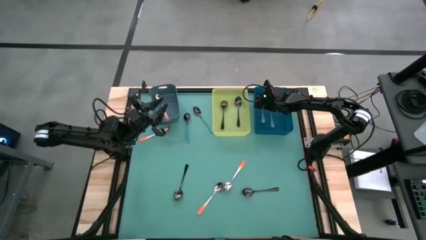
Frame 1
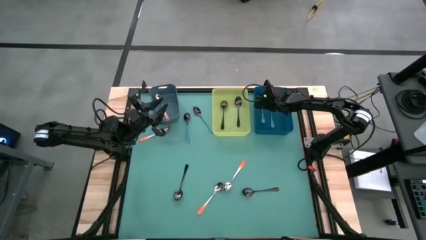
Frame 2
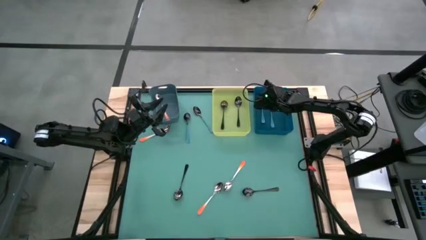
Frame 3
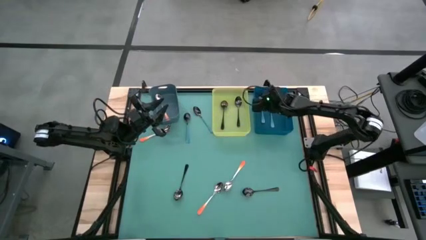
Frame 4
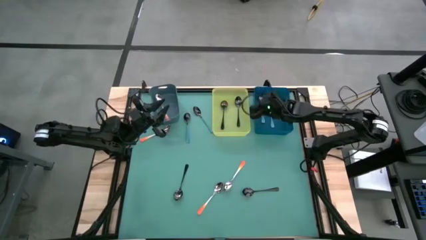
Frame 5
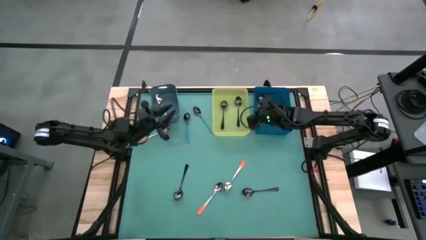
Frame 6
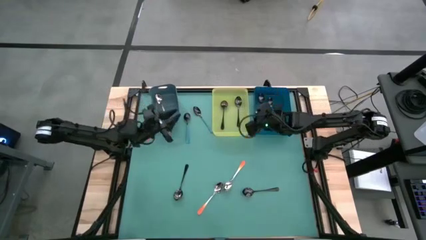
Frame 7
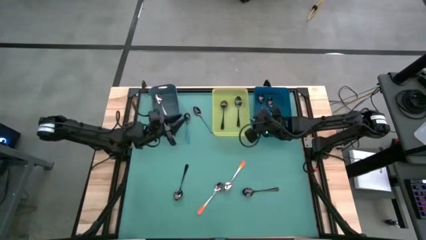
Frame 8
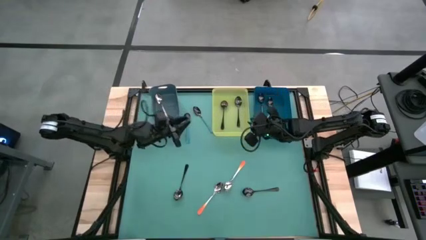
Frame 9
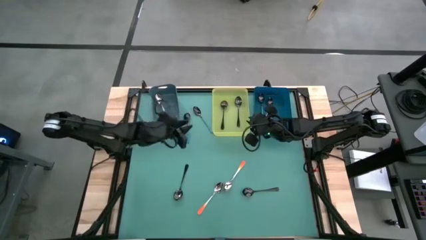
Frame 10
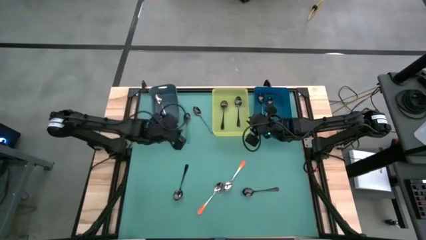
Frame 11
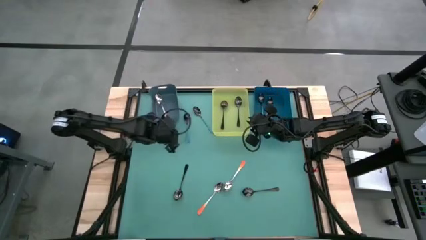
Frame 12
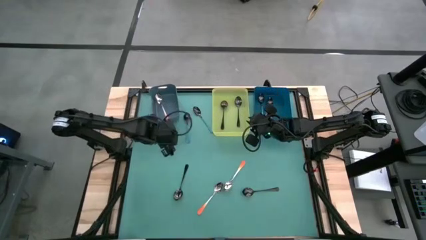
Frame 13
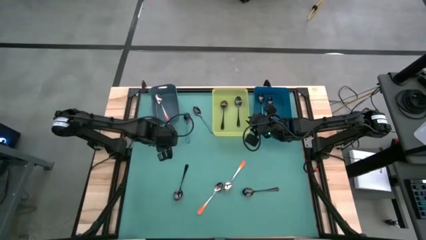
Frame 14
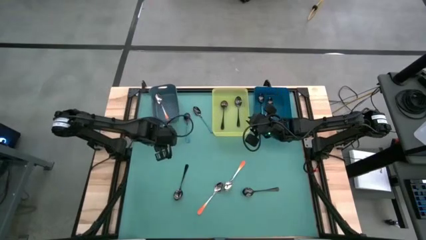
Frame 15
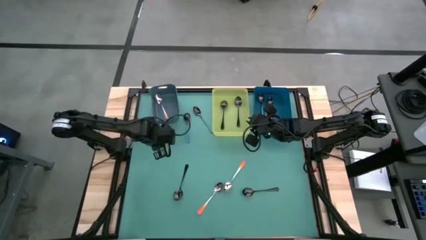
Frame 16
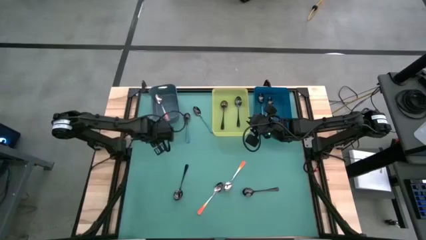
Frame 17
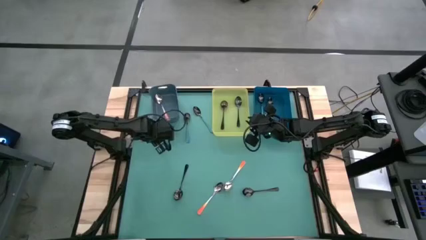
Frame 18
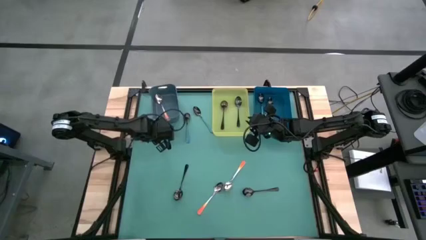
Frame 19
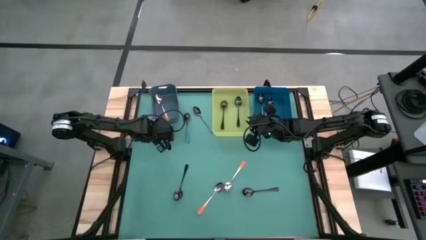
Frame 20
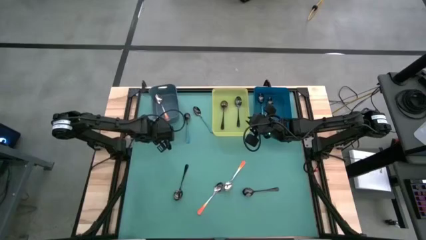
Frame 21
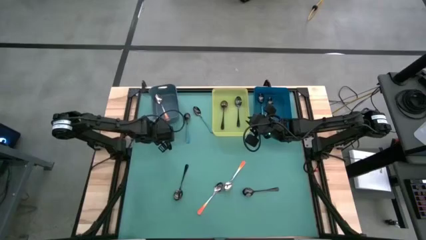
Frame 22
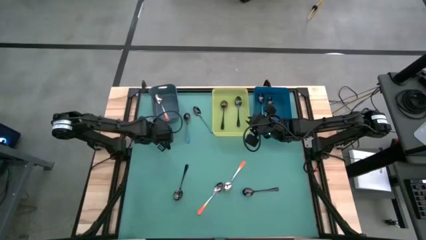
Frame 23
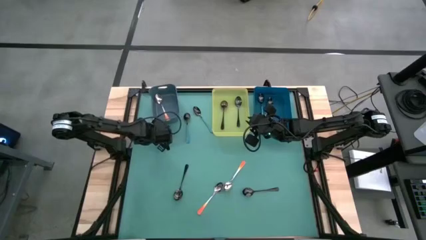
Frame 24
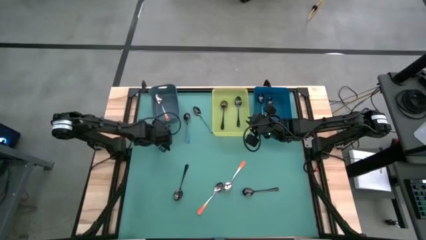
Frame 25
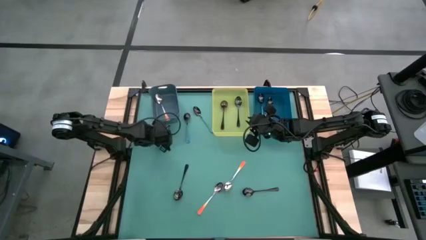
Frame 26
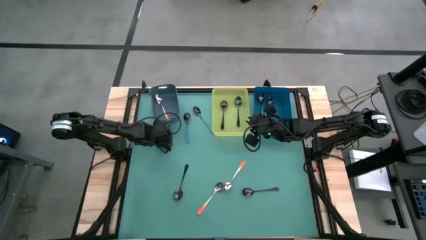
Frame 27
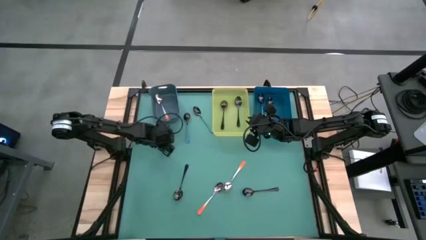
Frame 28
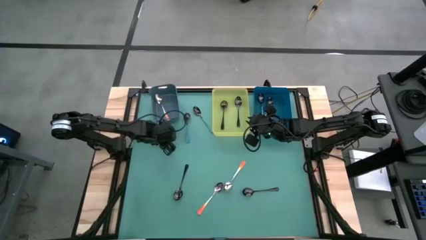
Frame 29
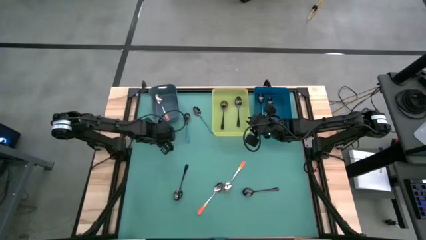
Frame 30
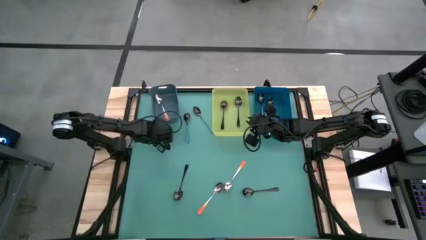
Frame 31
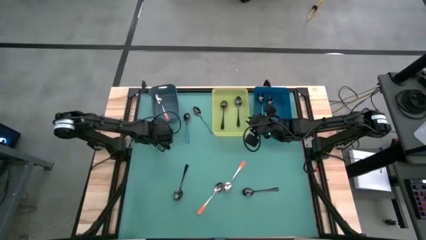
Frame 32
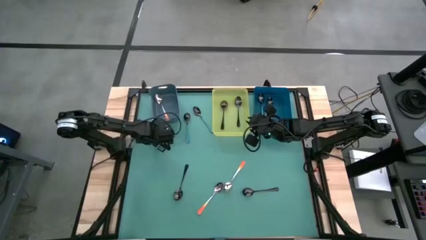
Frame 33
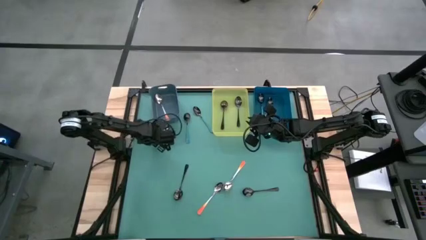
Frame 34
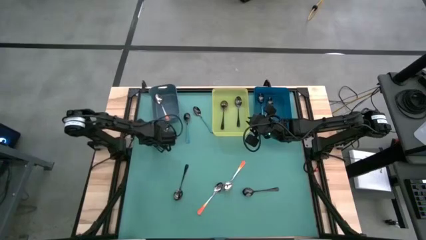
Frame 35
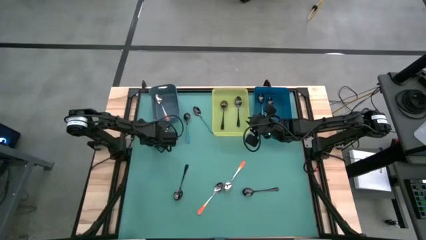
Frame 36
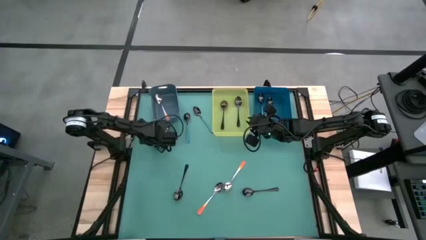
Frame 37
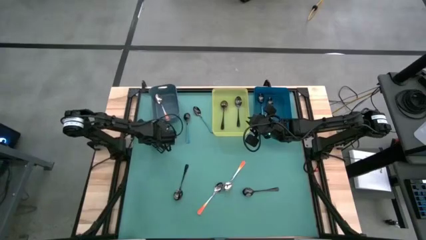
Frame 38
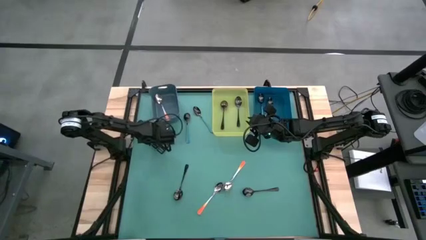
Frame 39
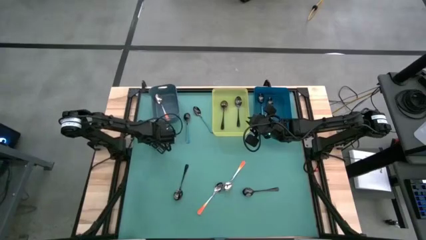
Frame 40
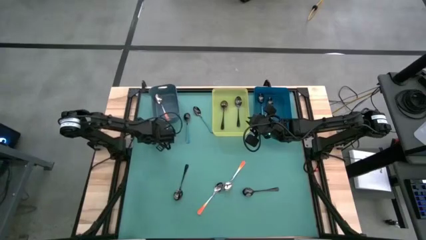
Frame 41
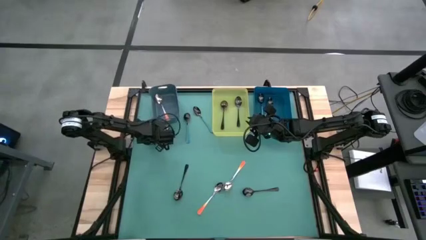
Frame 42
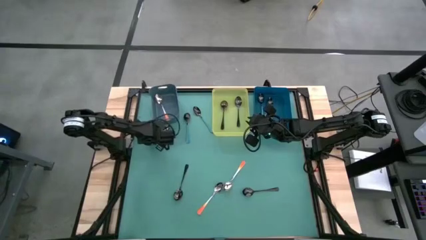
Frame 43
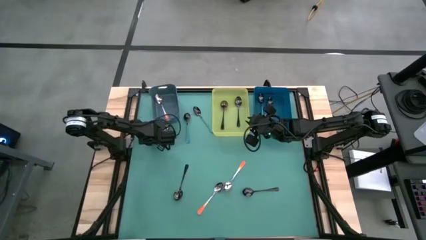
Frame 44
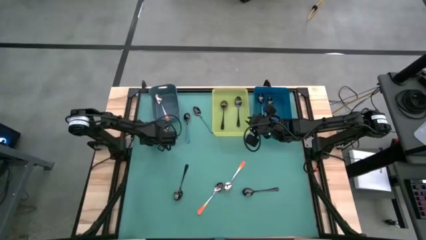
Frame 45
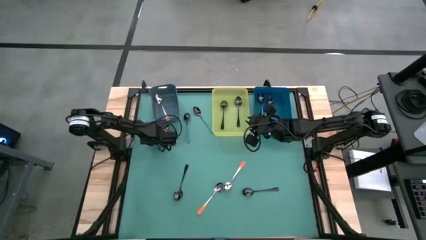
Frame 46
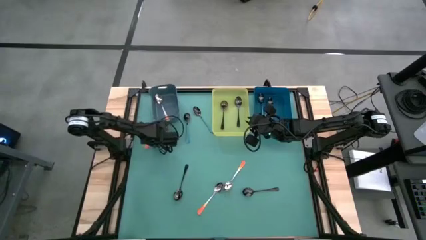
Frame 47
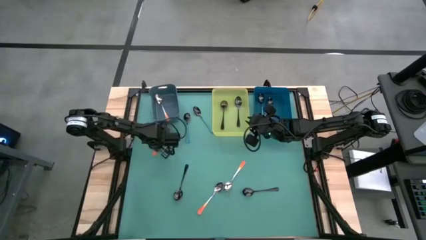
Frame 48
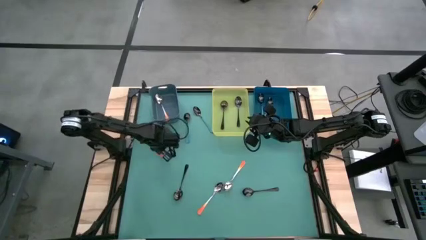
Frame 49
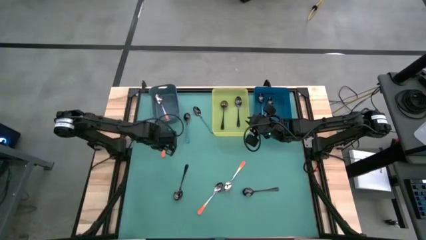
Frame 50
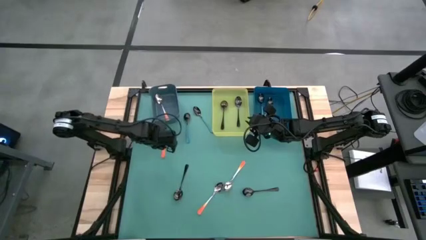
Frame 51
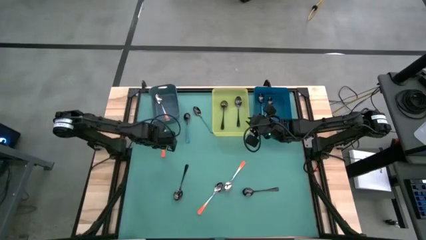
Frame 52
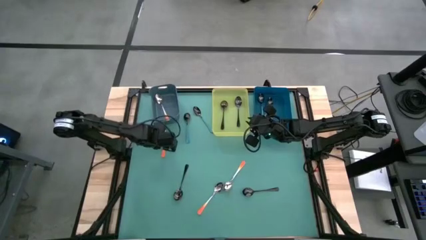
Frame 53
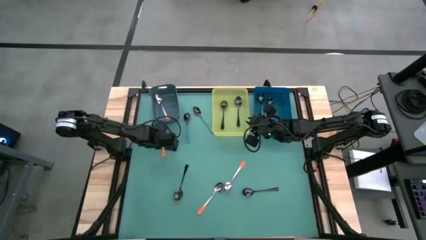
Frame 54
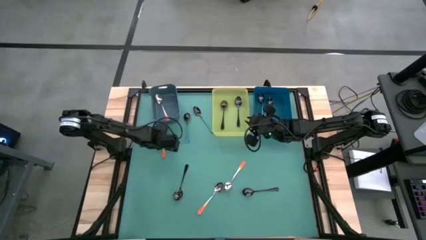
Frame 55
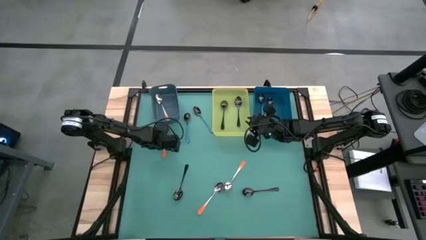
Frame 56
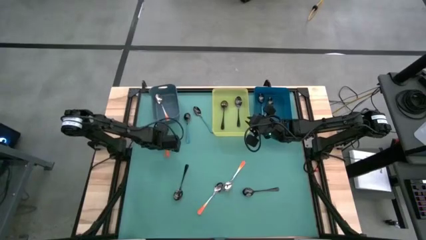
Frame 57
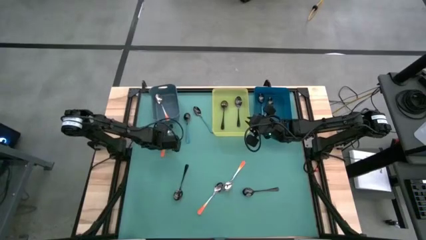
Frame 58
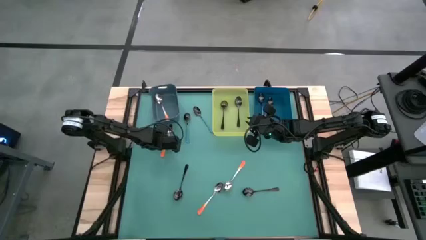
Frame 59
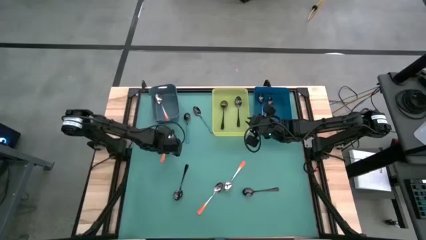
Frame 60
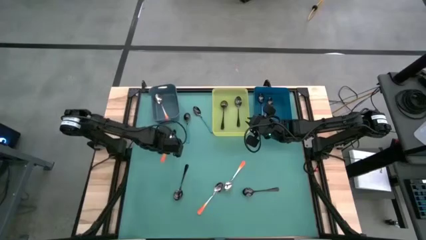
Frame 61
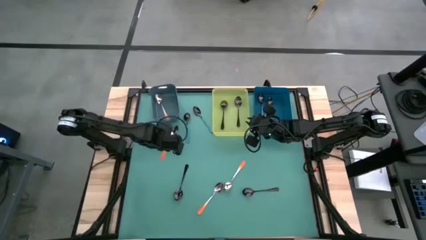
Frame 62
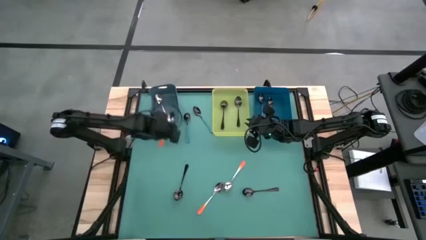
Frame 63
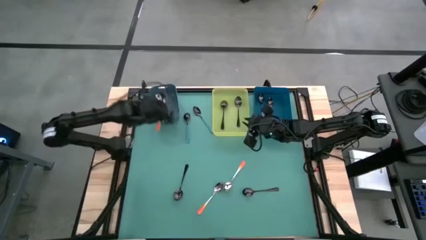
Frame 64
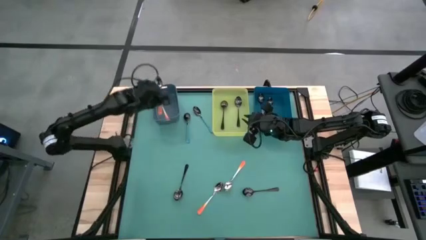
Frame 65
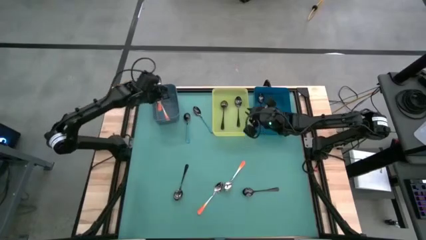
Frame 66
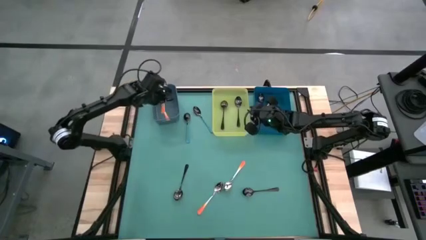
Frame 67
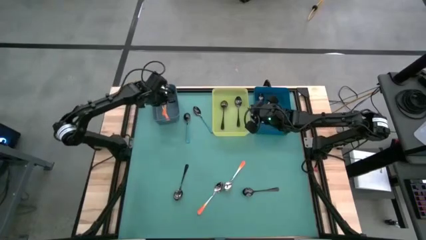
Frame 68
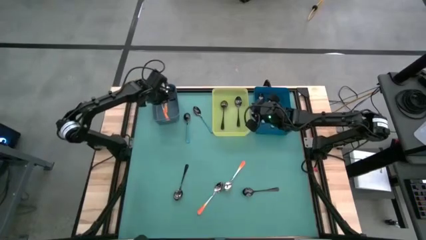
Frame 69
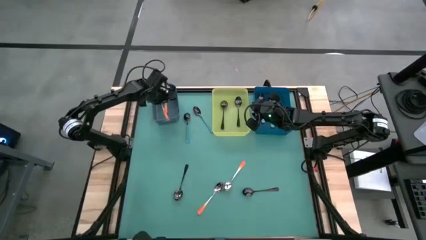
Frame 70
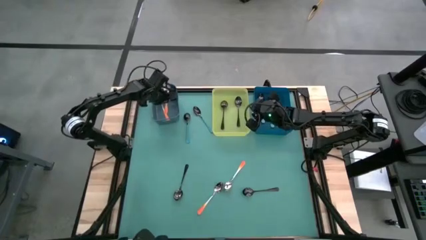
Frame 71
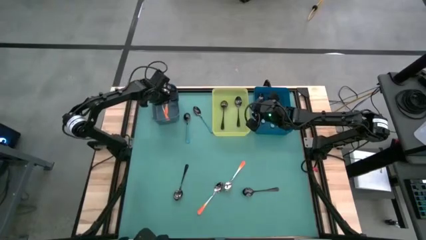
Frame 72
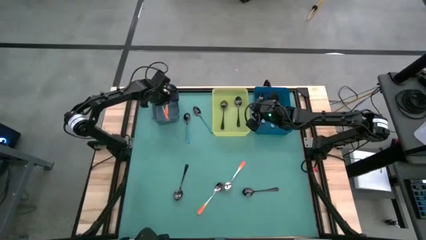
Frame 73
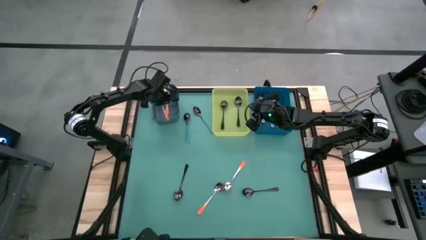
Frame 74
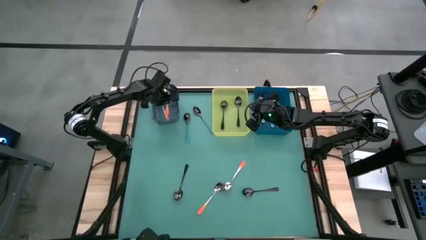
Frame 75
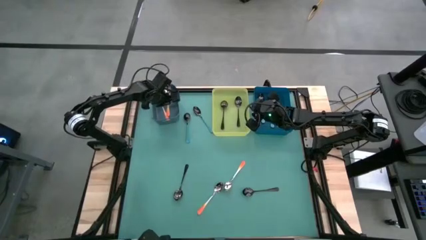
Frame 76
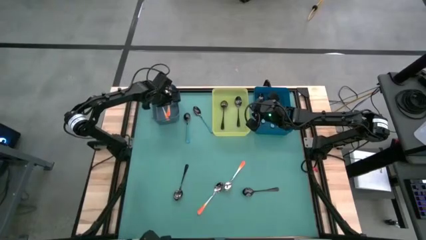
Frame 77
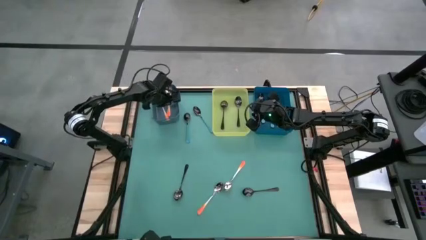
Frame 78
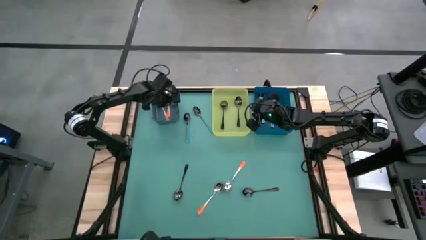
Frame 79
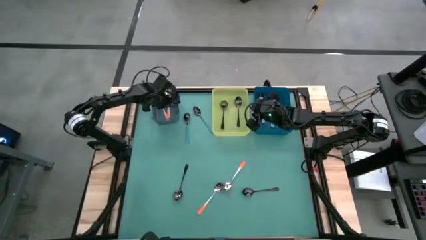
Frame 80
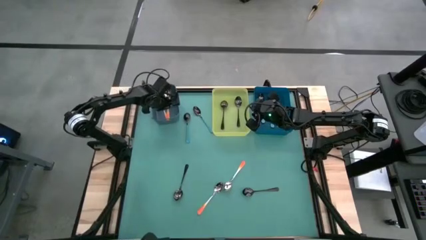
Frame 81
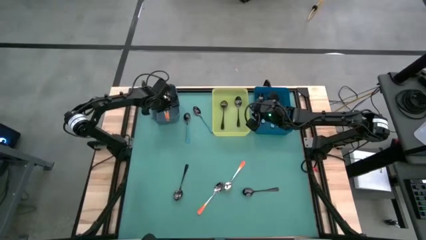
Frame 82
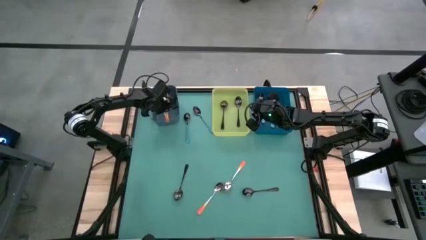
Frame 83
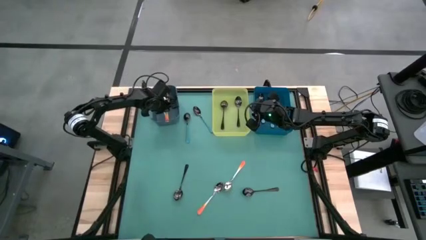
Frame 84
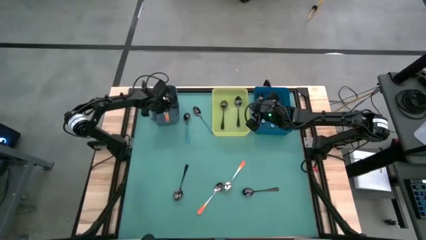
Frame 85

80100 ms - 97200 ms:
Task: Sort silverware by color (type)
Put the orange spoon into the green bin
